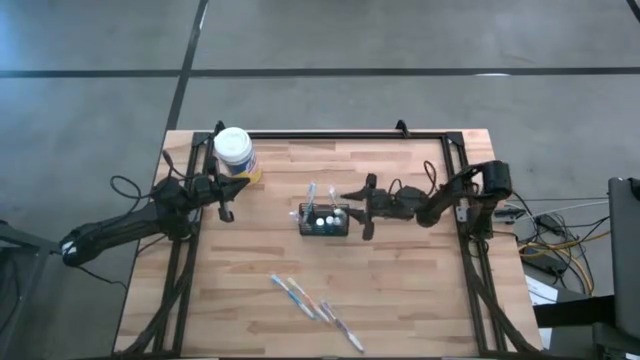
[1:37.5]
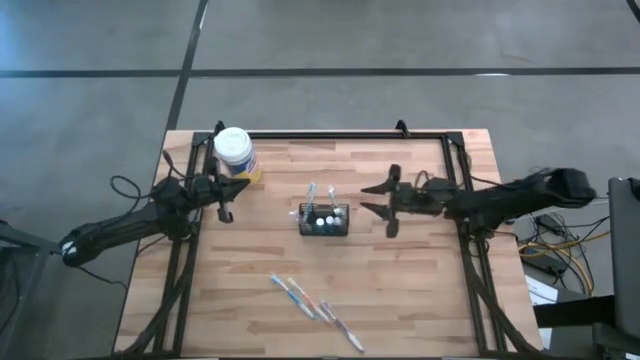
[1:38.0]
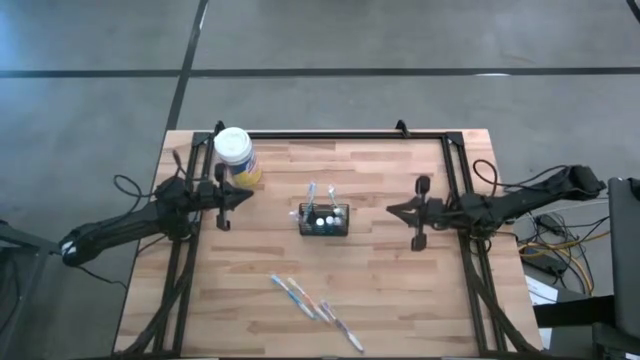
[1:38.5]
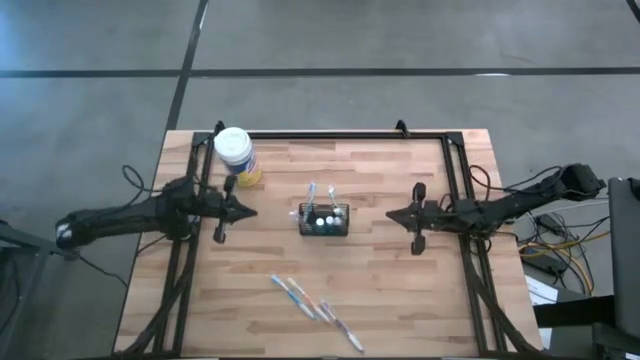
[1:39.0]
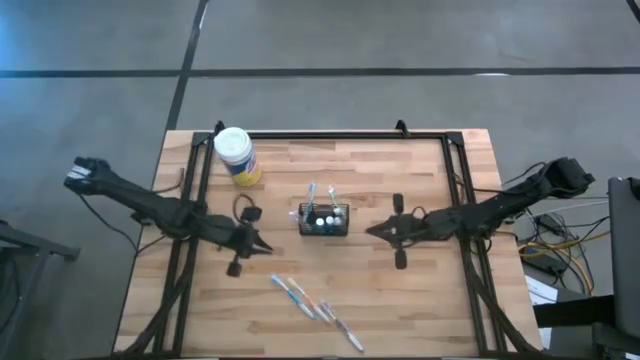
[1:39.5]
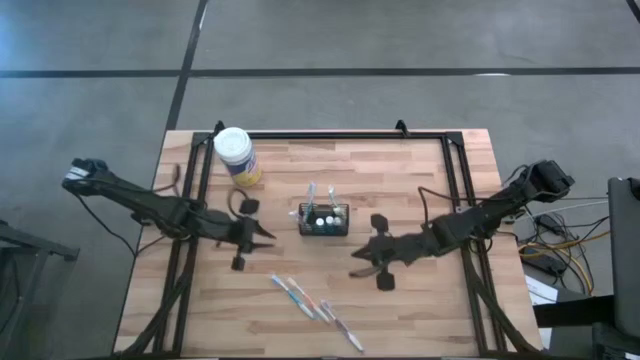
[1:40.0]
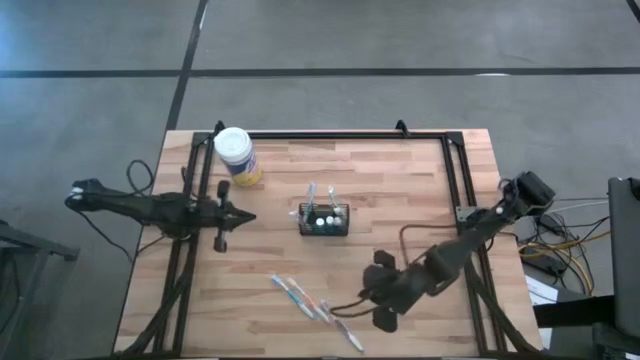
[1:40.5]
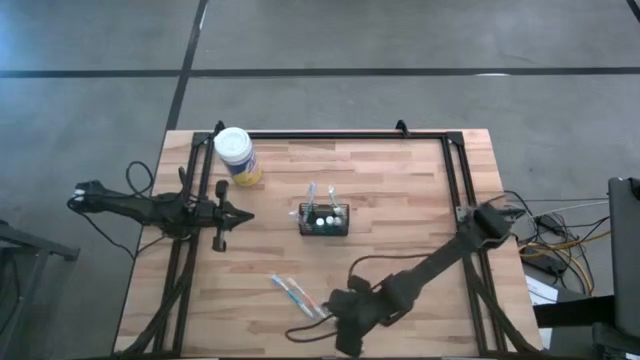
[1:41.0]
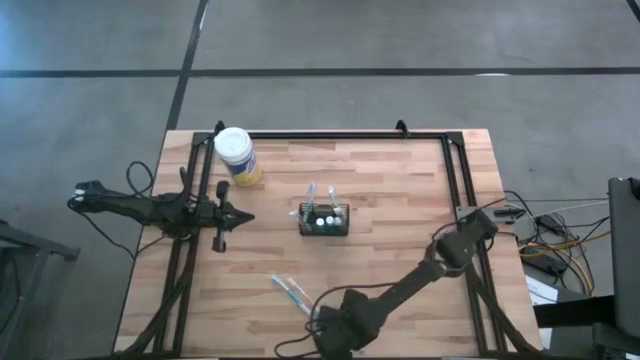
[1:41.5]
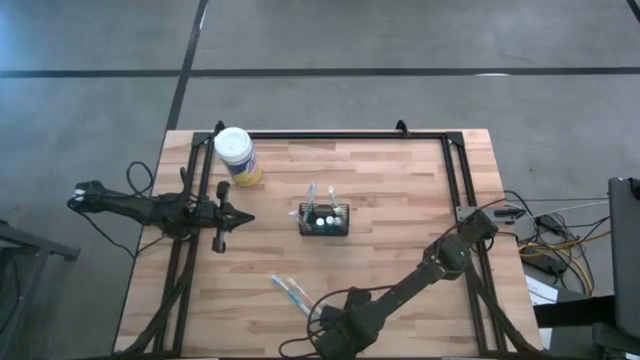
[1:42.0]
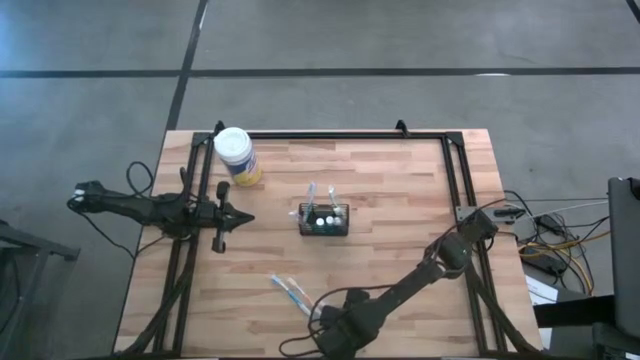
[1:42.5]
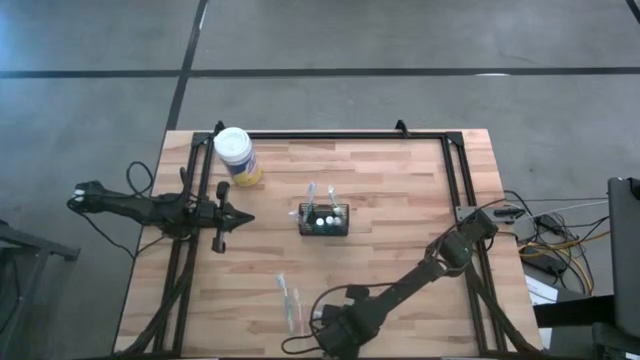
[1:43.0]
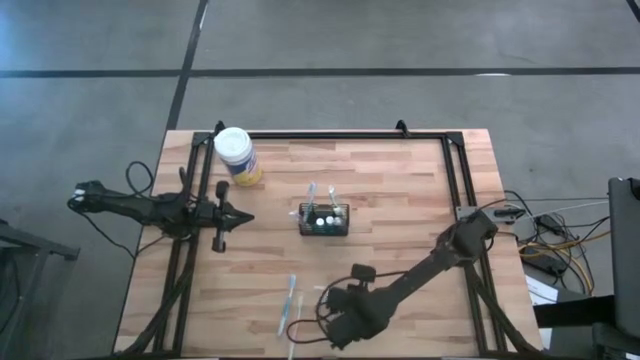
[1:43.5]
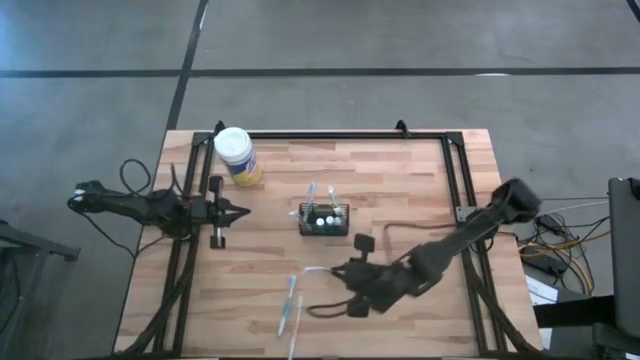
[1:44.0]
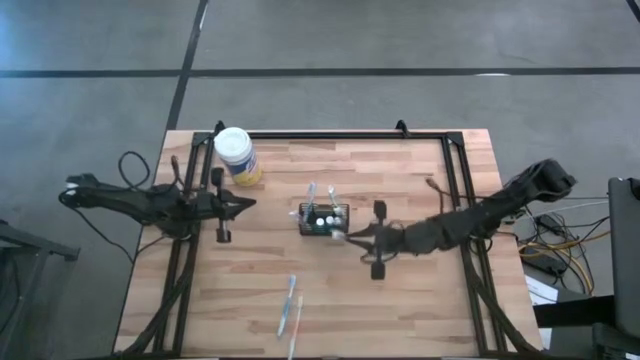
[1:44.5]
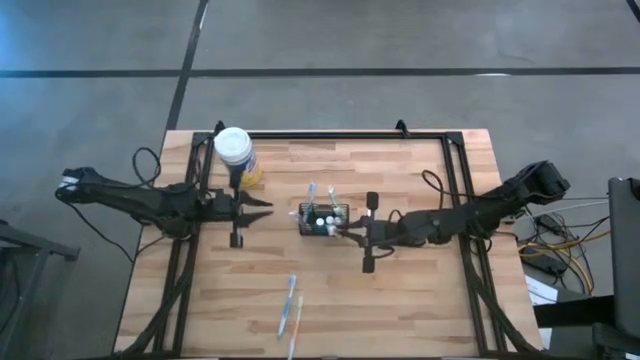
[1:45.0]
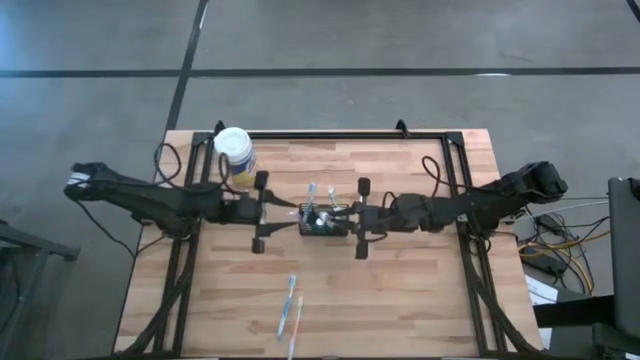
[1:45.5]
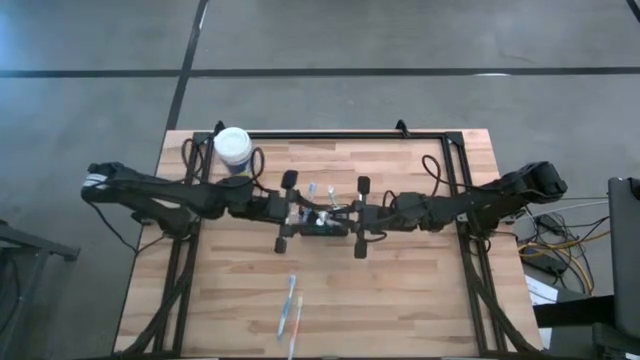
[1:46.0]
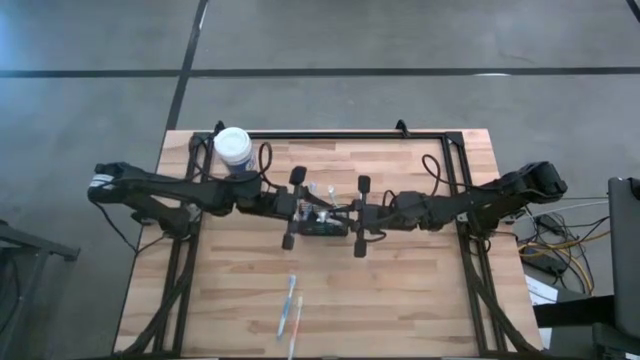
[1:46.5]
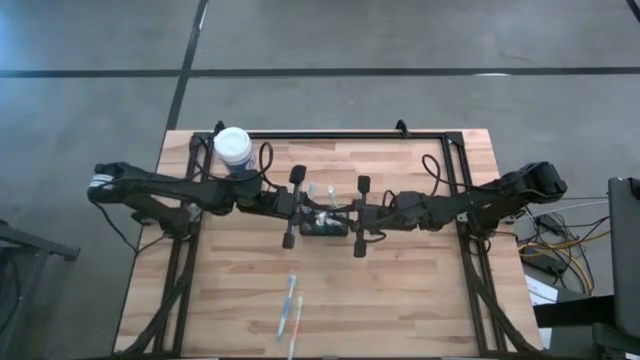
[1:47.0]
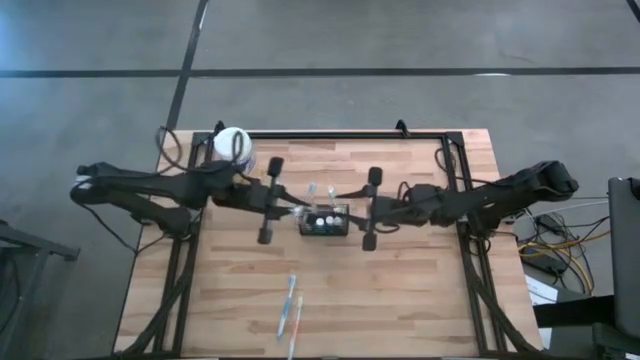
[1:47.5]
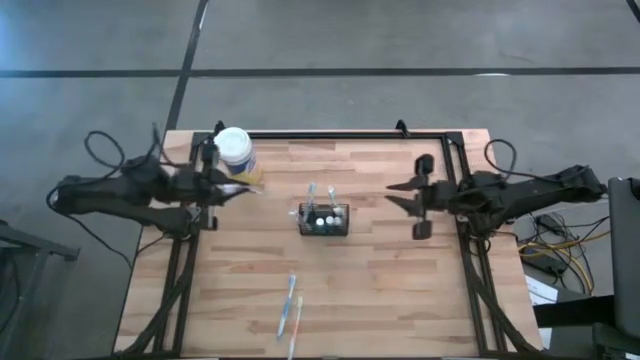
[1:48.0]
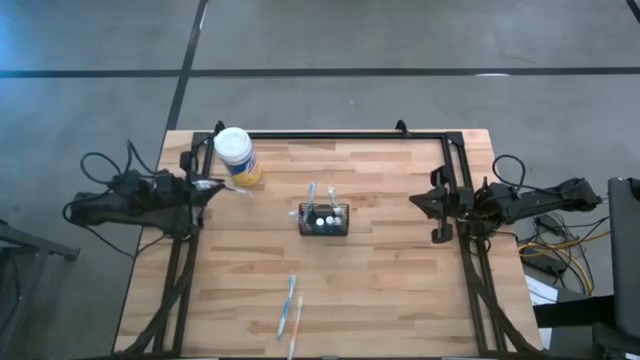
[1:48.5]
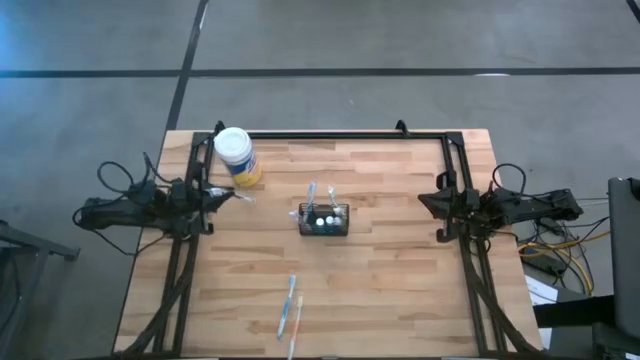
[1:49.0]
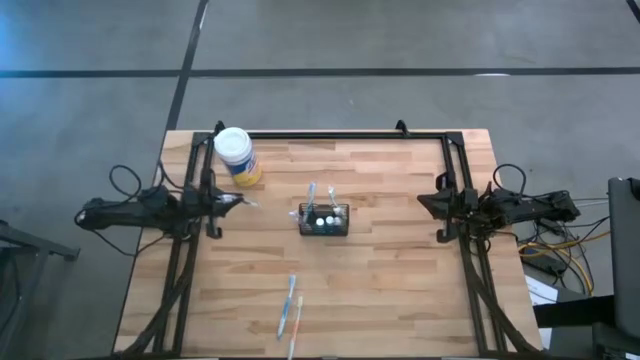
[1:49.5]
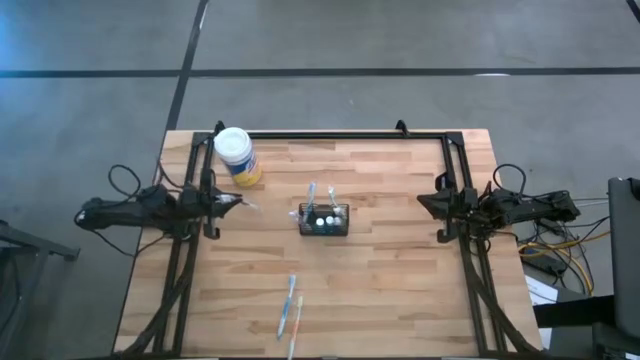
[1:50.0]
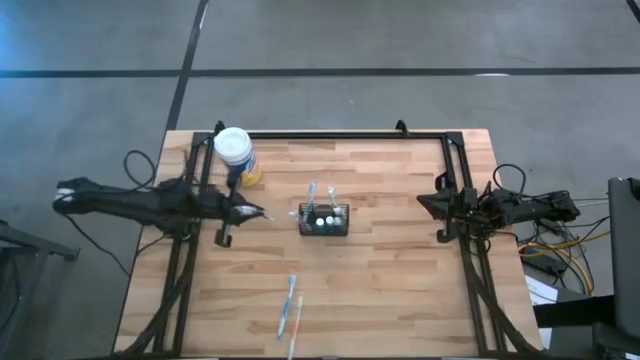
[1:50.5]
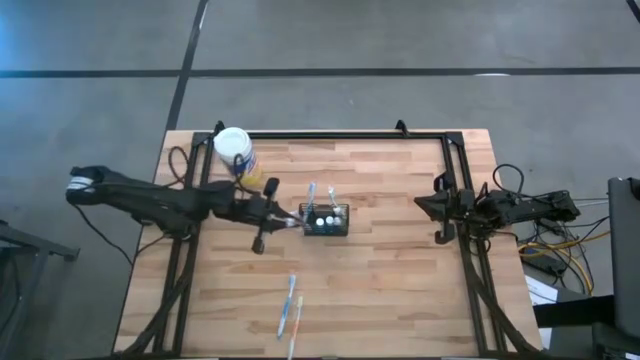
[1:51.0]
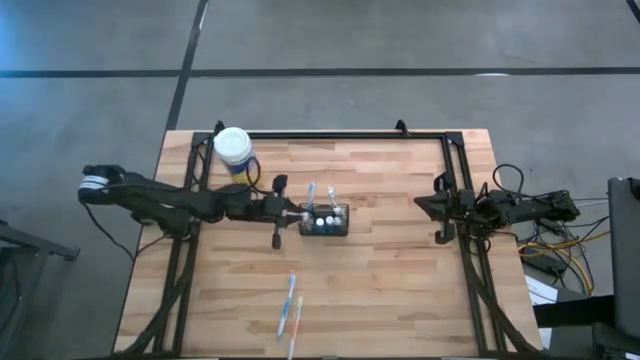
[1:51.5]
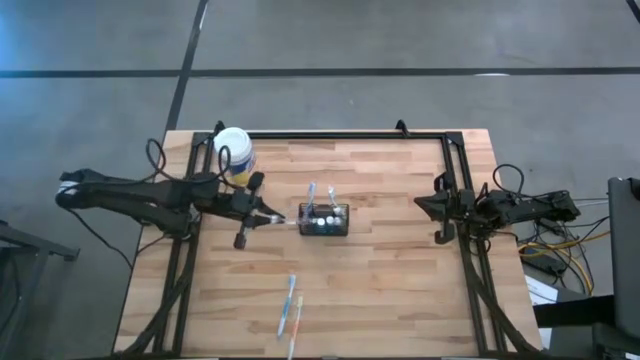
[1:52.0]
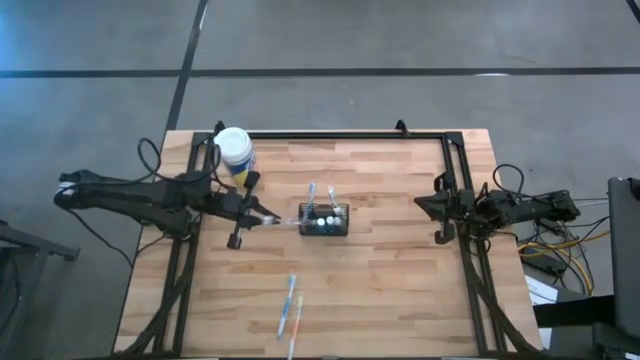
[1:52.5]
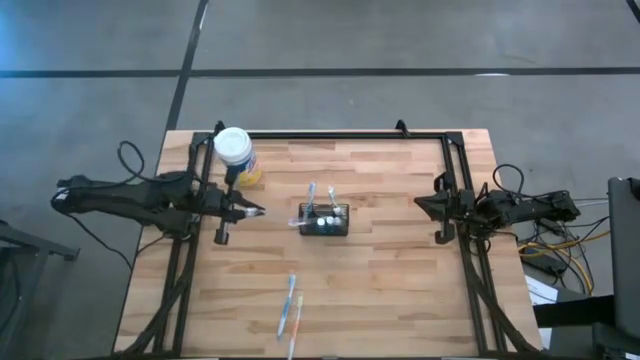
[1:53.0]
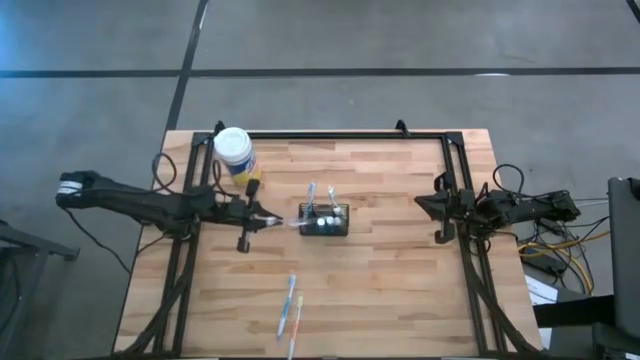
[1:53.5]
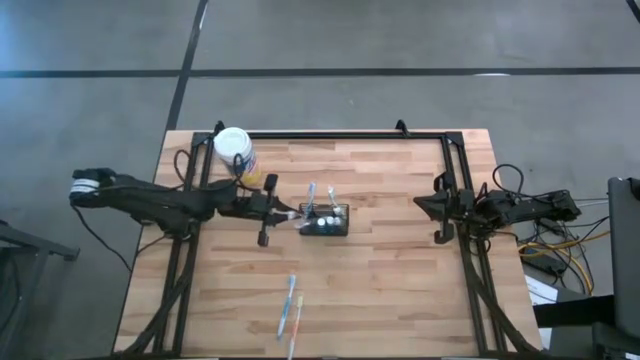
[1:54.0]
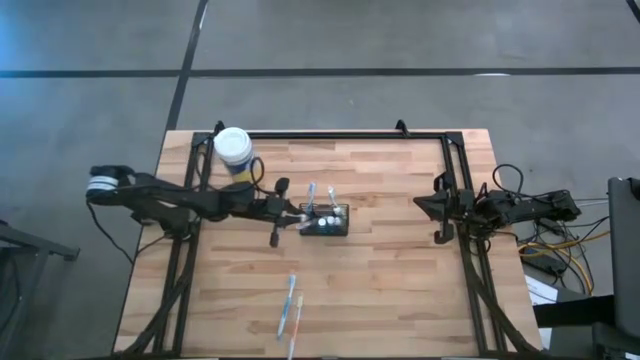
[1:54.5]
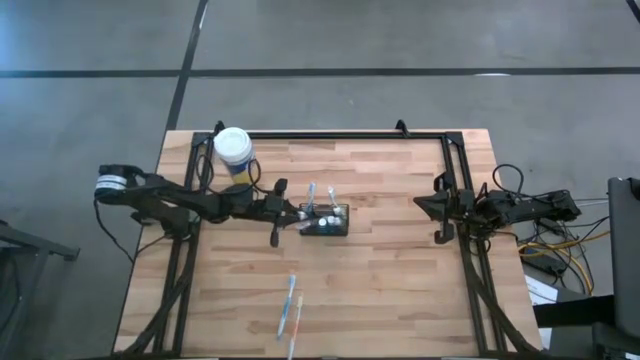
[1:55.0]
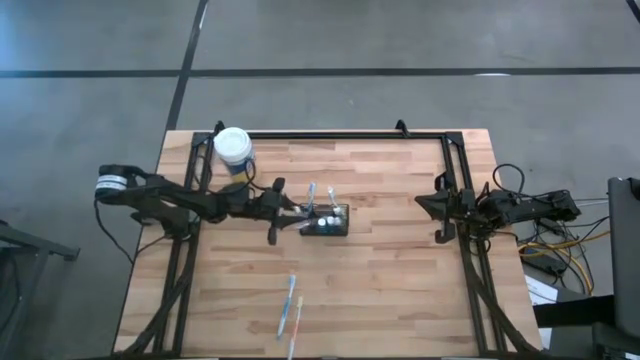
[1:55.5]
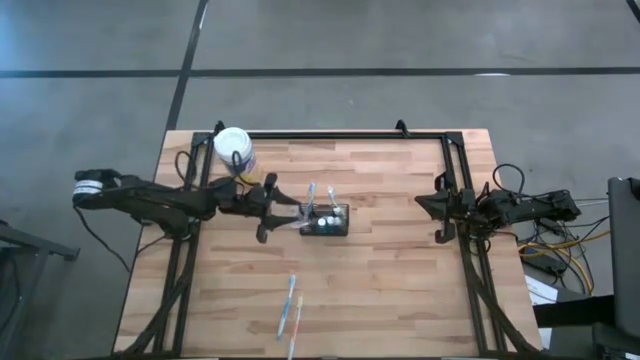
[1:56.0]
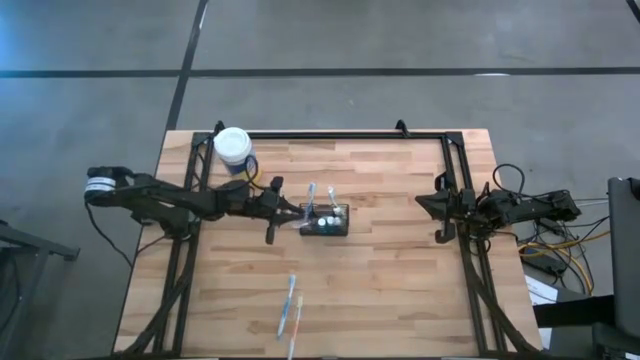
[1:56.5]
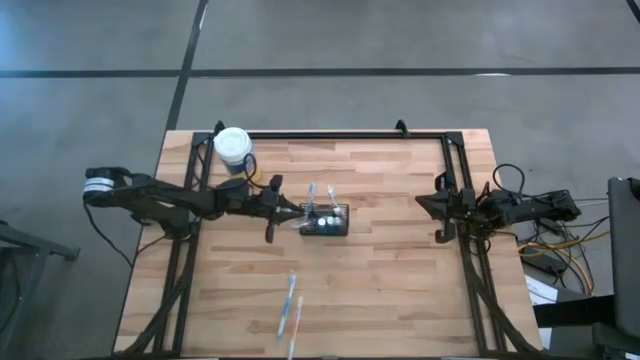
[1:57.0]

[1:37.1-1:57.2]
Task: Pick & Place toothbrushing station
Put the purple toothbrush into the wire organizer

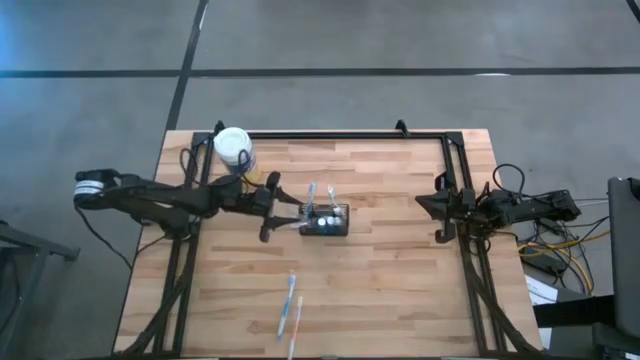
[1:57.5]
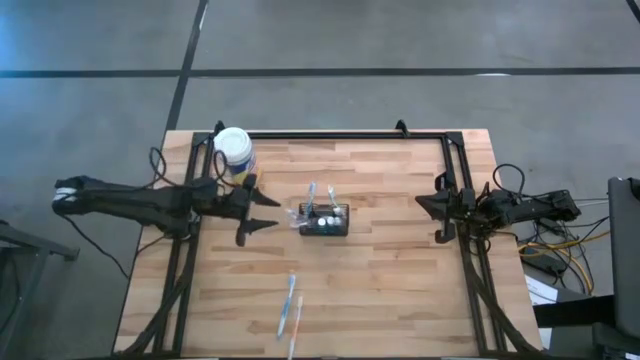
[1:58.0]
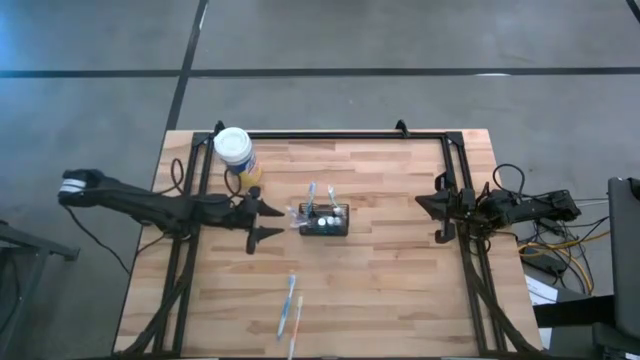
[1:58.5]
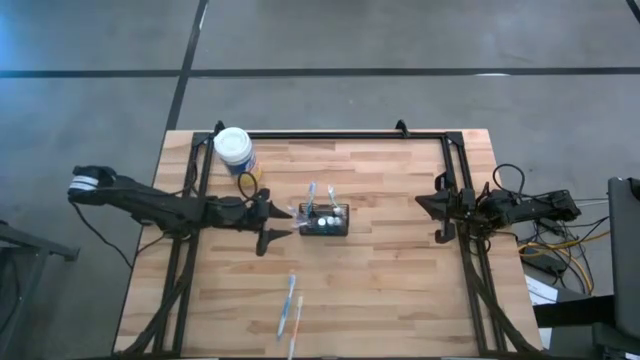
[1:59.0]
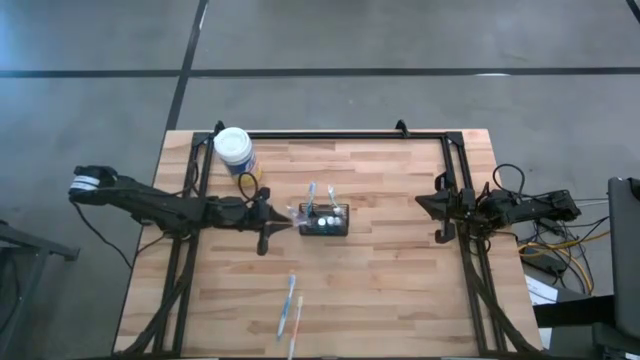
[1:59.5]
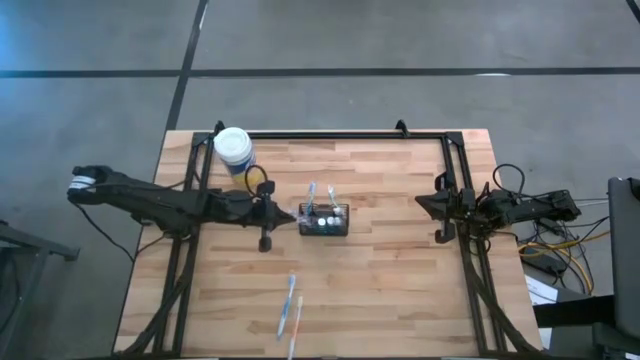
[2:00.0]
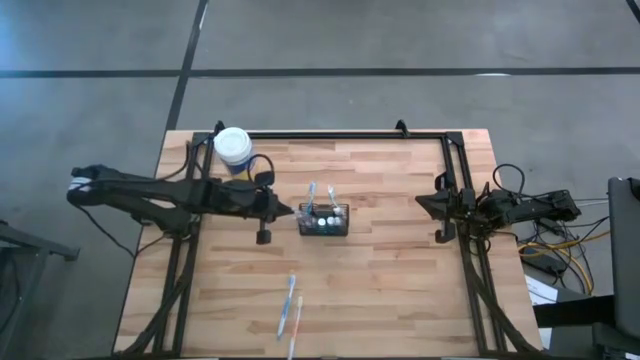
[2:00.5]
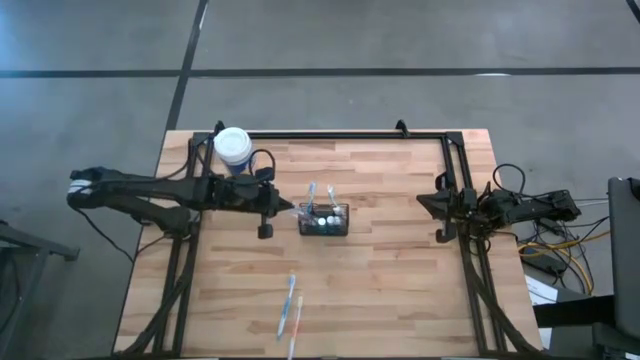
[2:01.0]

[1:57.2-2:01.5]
Adjust the right purple toothbrush
